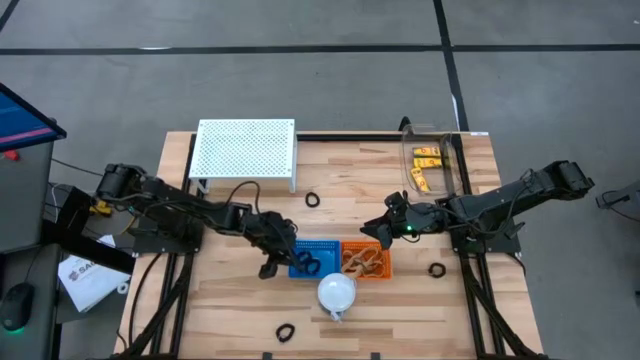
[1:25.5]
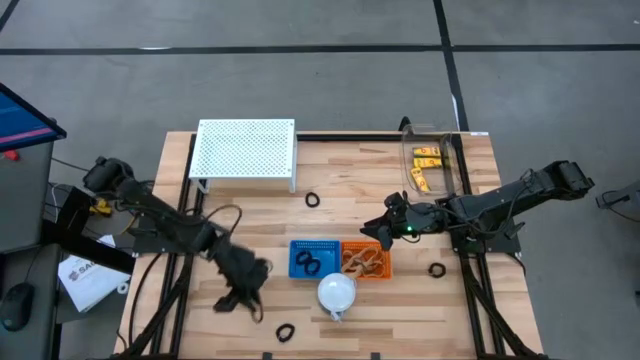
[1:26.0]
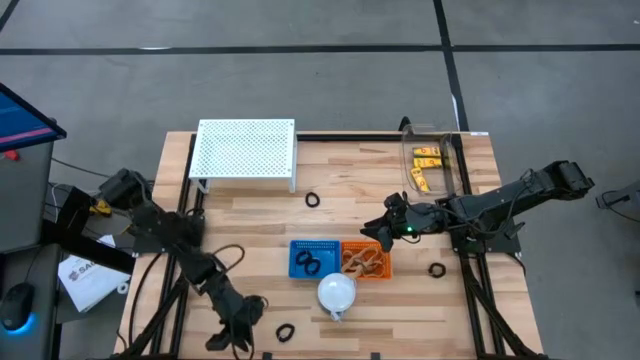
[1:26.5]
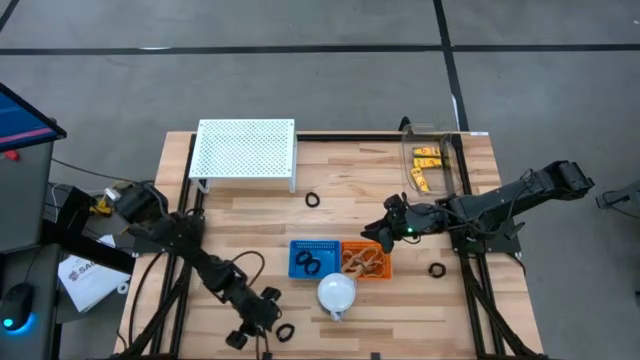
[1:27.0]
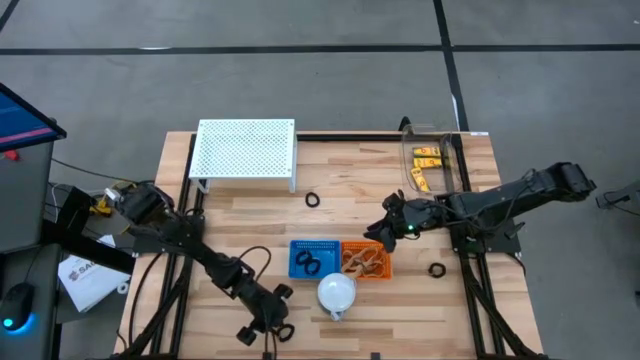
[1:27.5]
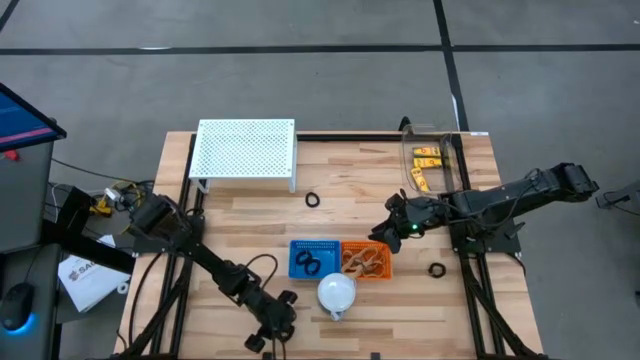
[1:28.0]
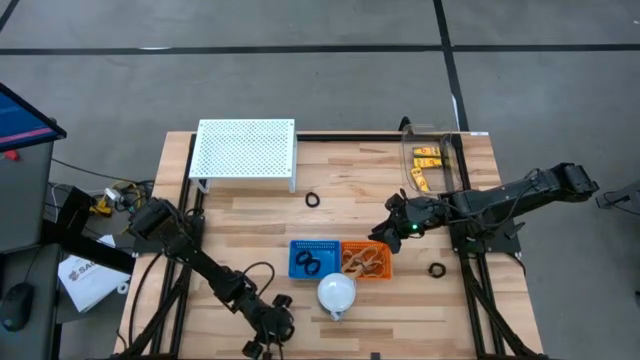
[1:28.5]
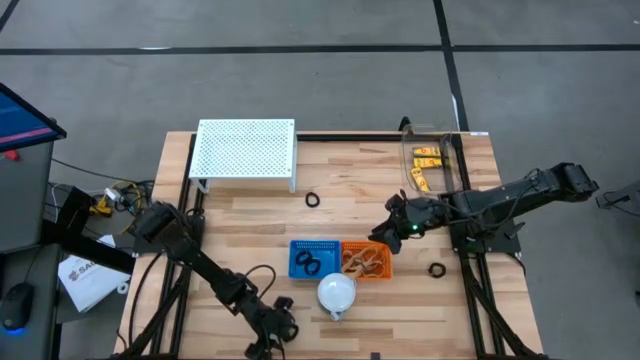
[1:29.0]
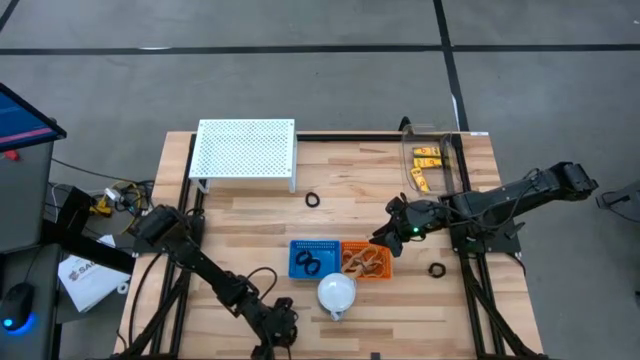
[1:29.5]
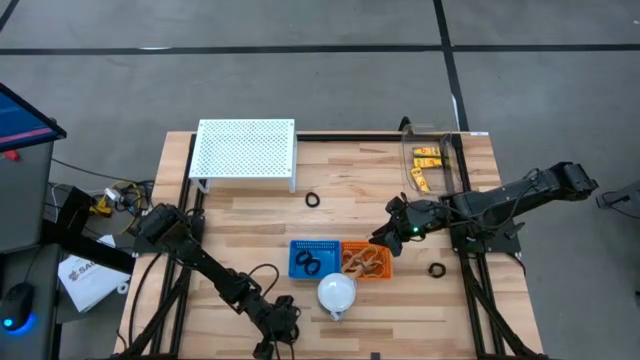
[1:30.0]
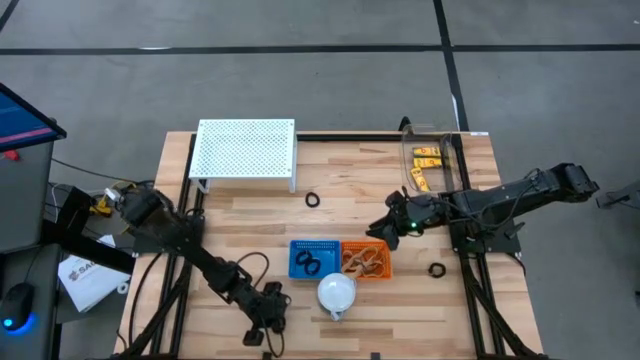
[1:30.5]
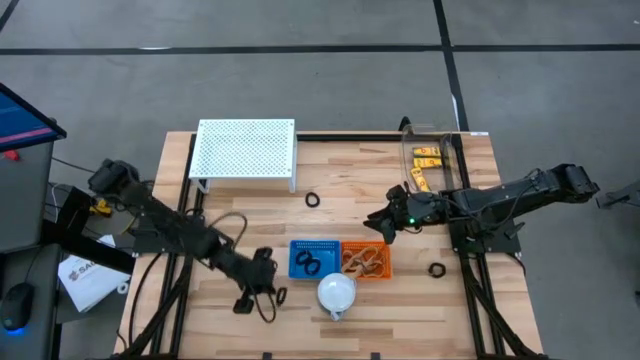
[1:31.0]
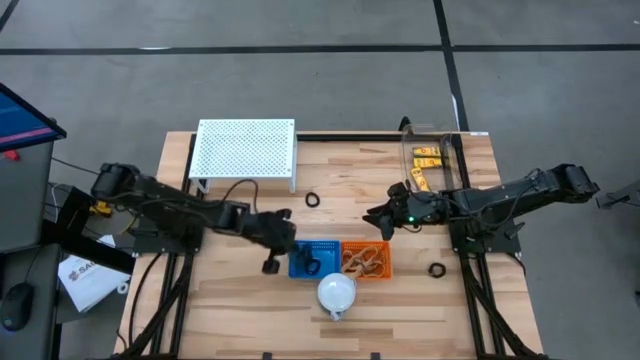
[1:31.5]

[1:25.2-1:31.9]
Task: Pick & Place Office Desk Supplies
Put the black spring keychain into the blue basket

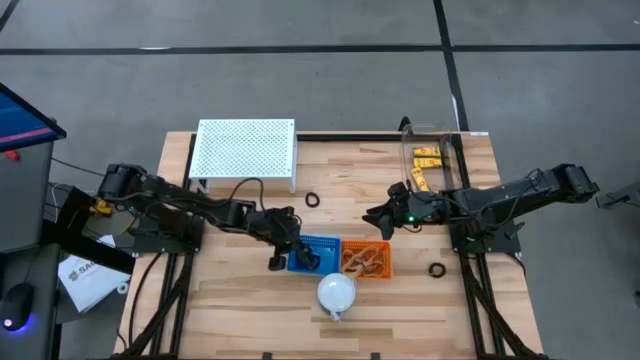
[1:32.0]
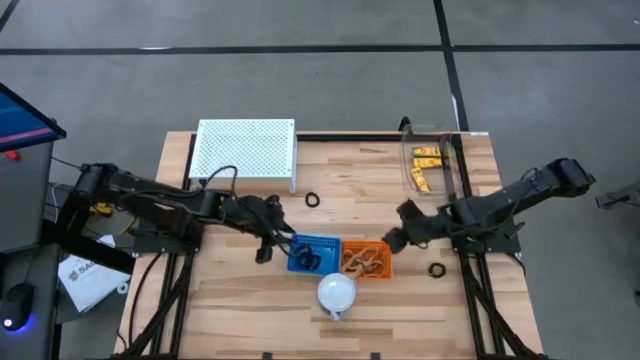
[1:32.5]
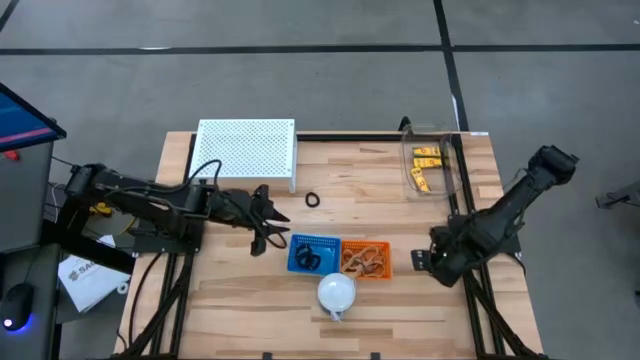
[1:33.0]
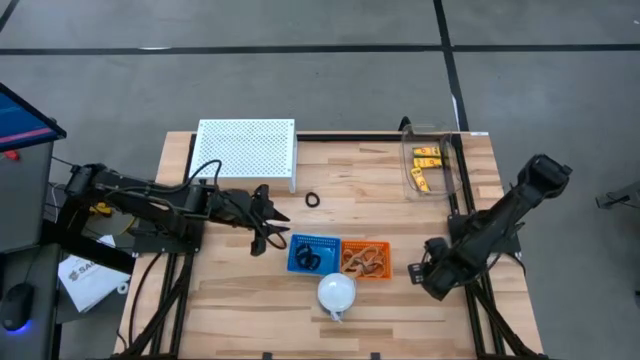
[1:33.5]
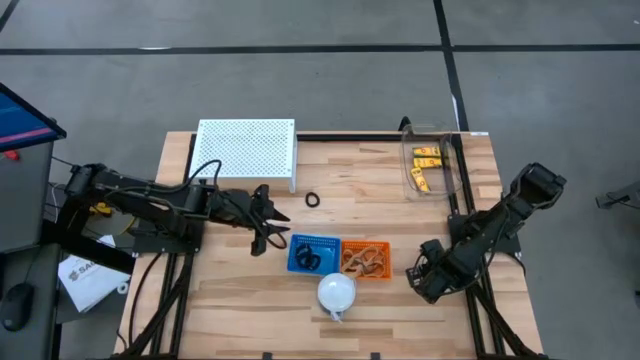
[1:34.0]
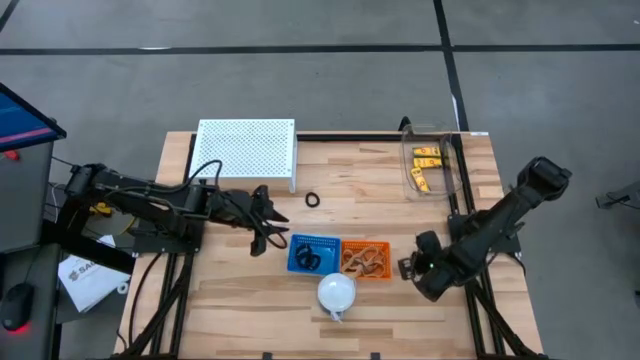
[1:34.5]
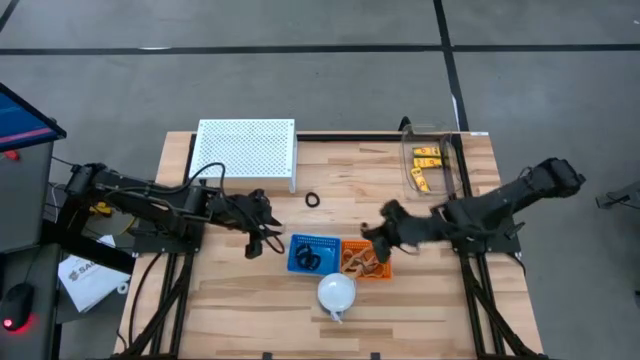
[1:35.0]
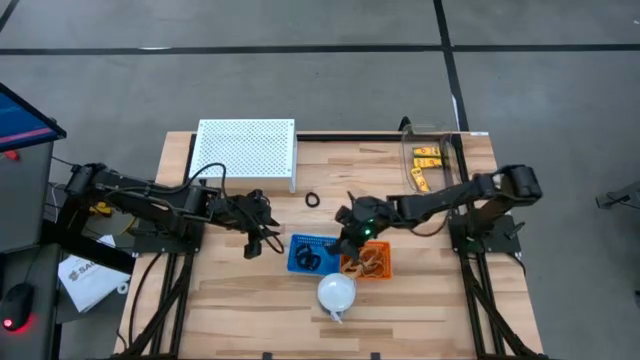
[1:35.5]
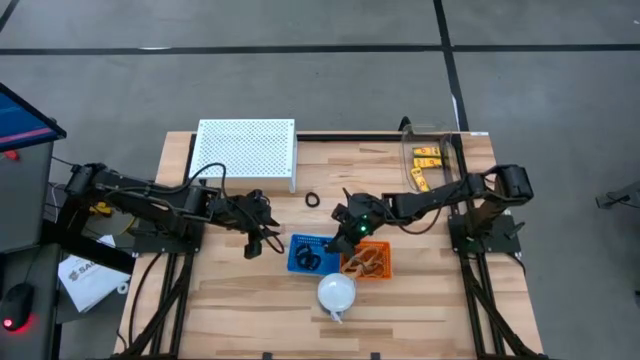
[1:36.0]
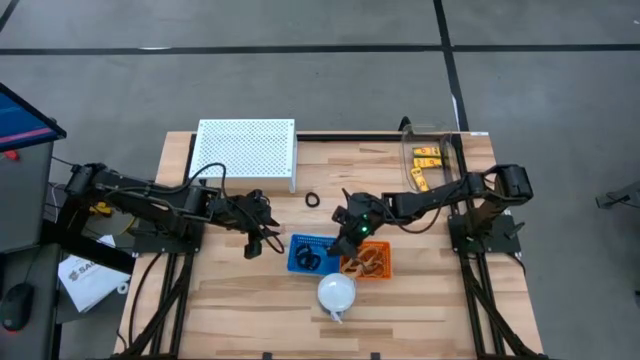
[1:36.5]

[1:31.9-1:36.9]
Put the black spring keychain into the blue basket

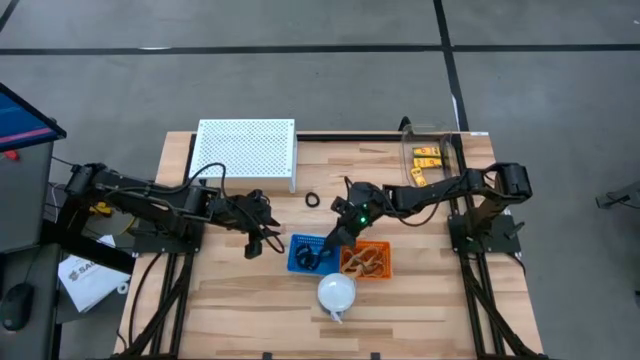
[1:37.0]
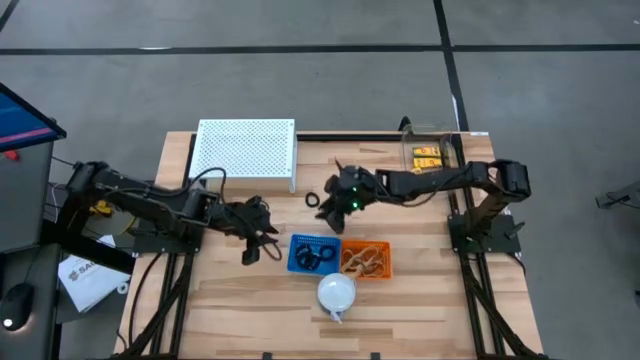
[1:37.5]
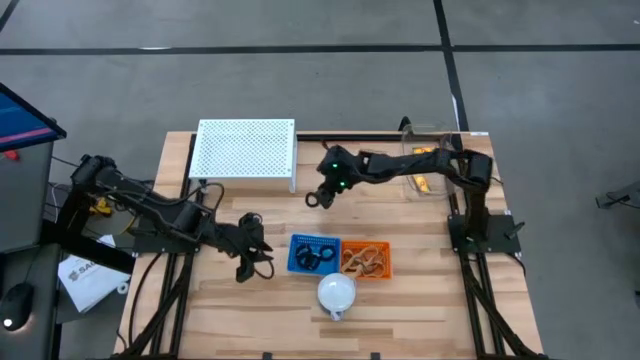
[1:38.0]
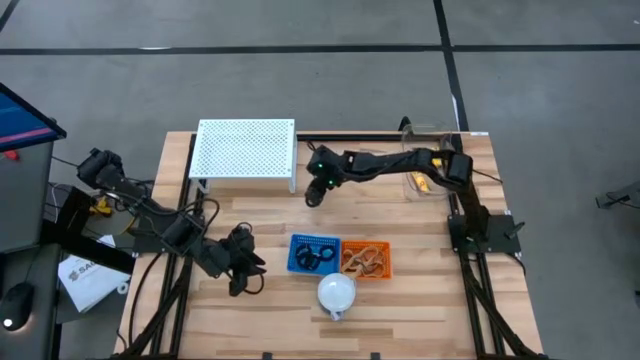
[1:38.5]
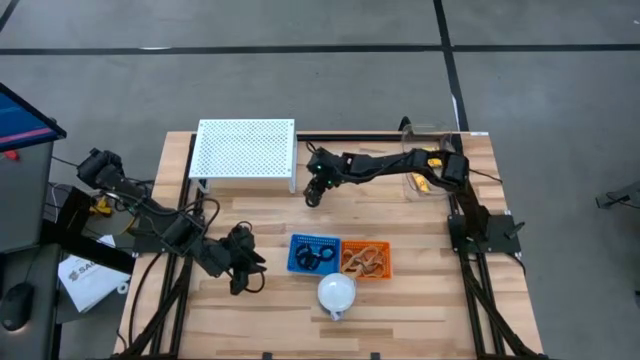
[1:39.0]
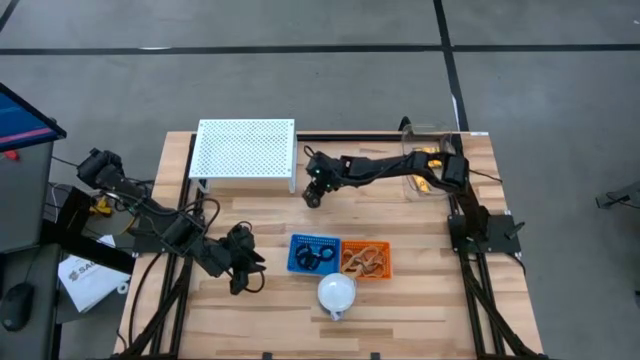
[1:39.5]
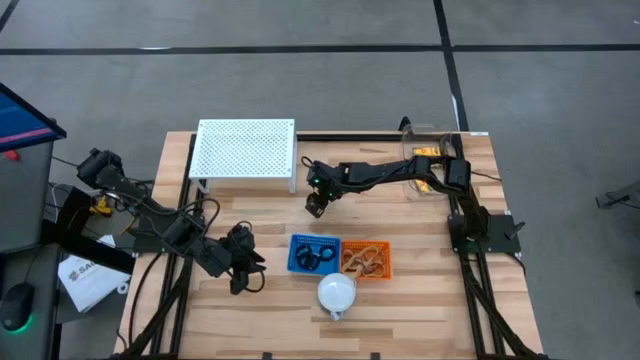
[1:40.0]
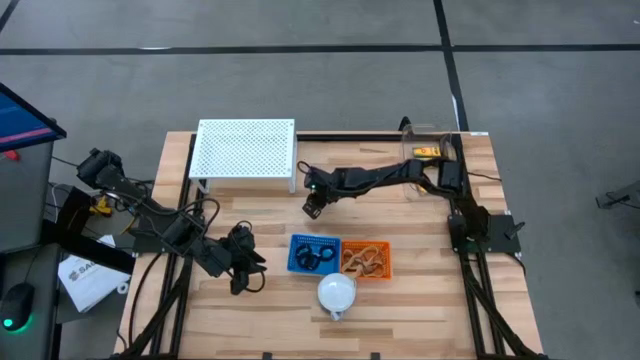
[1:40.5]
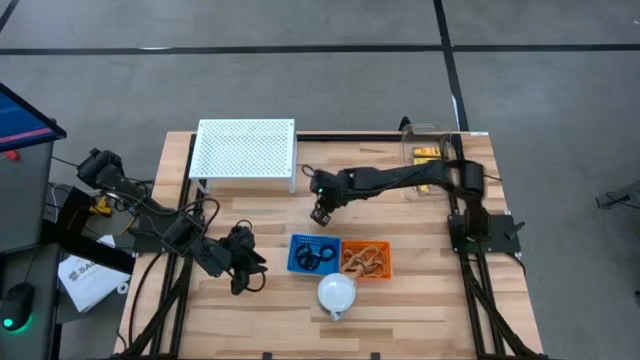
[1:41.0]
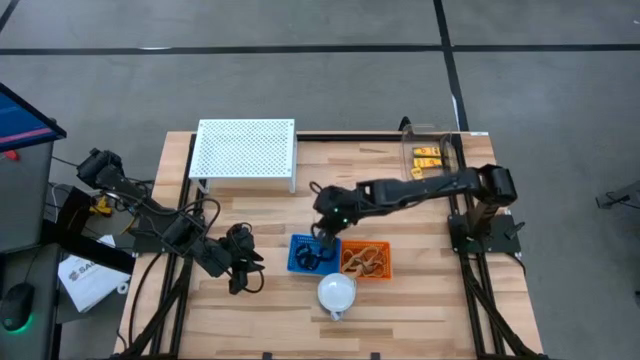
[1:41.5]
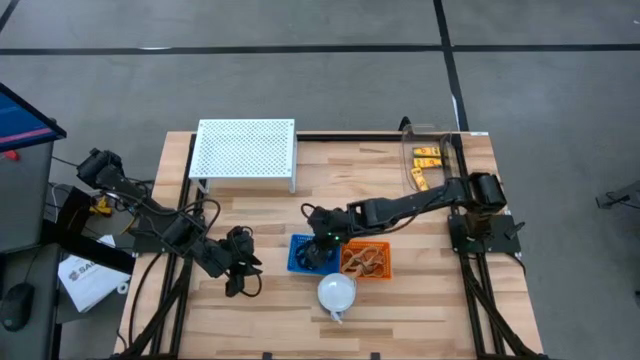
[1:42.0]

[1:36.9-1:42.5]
Put the black spring keychain into the blue basket

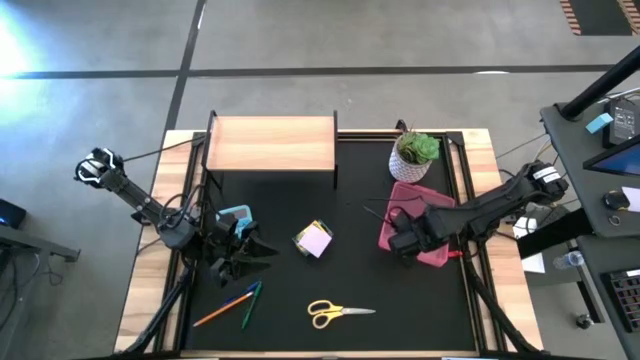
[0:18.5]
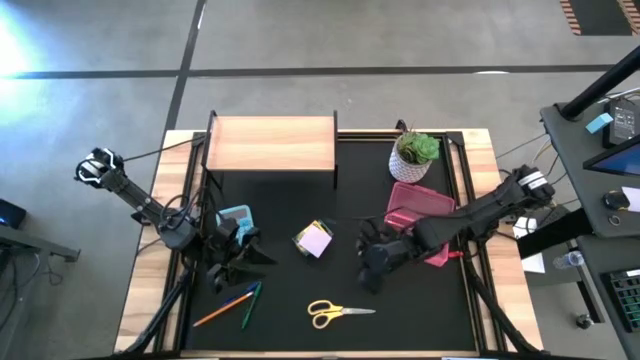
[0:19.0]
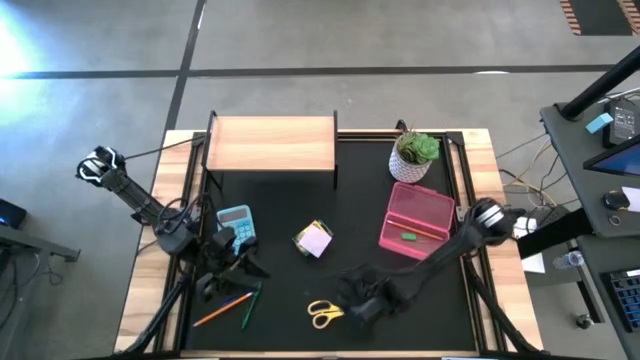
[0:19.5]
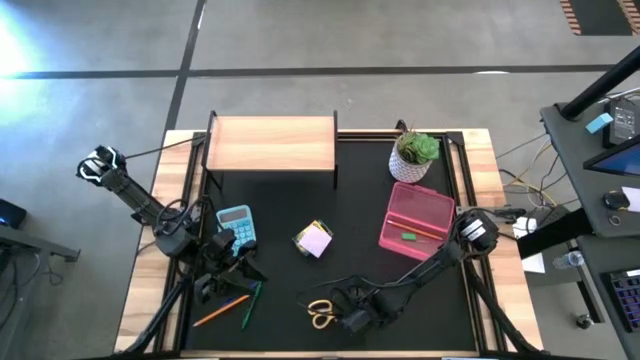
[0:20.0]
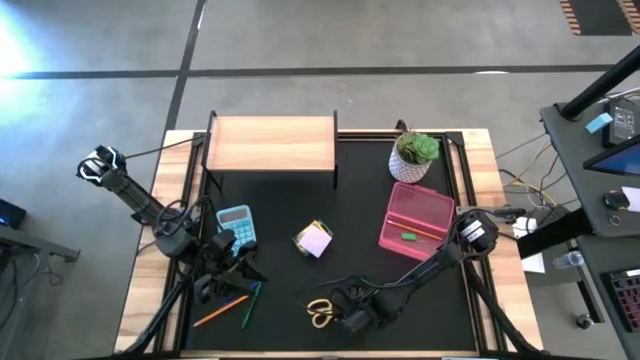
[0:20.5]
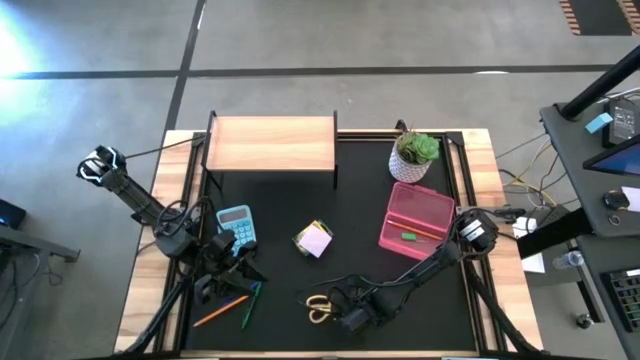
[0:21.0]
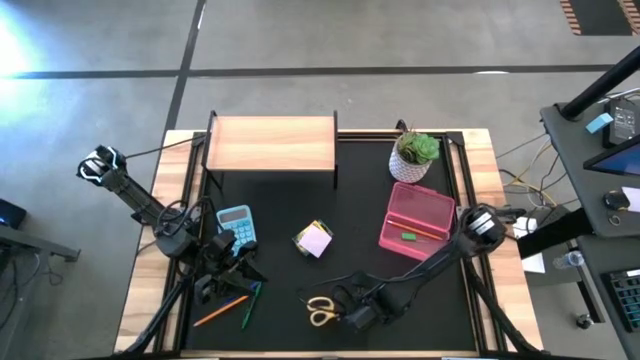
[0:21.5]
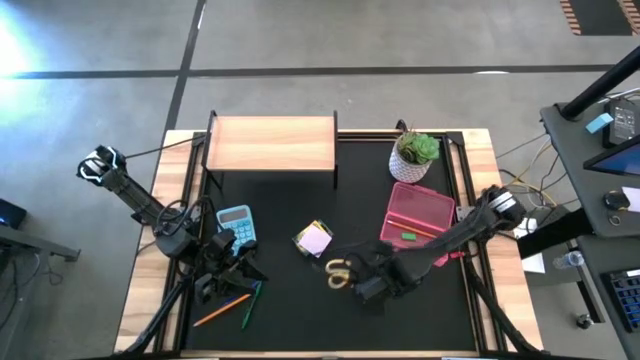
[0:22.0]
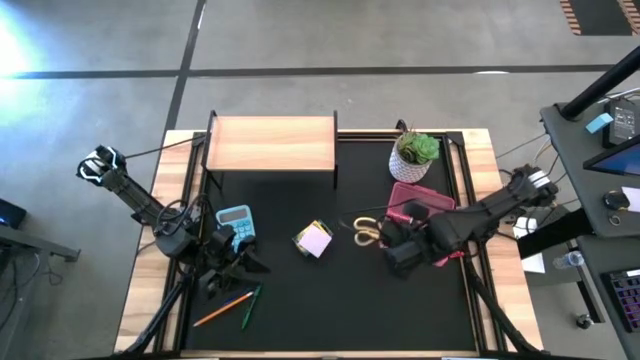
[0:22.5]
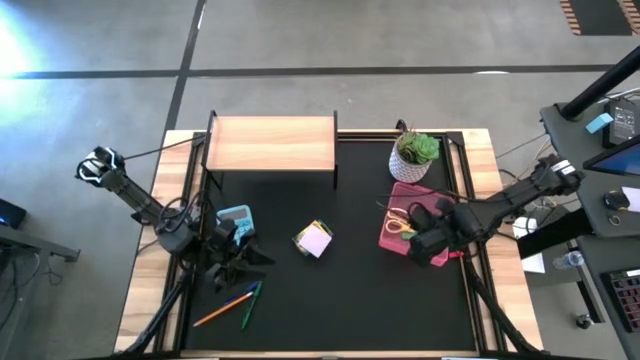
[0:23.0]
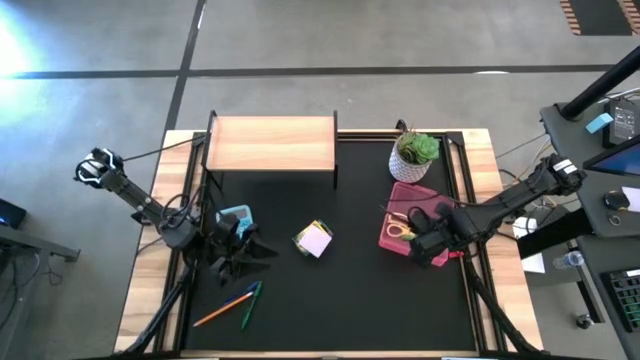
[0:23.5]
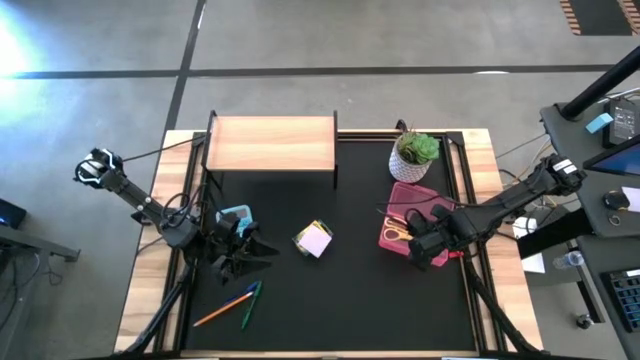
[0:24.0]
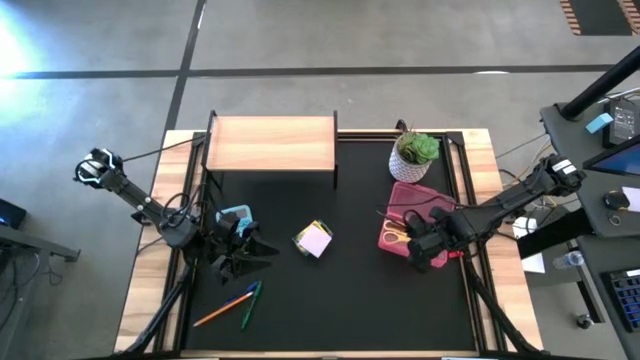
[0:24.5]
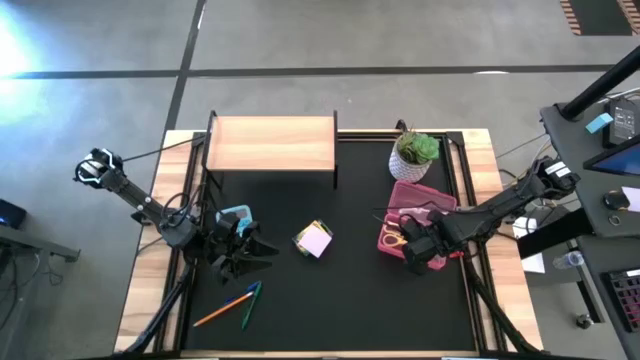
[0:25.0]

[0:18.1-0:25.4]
Task: Pack school essentials
Put the yellow scissors into the pink supply box
